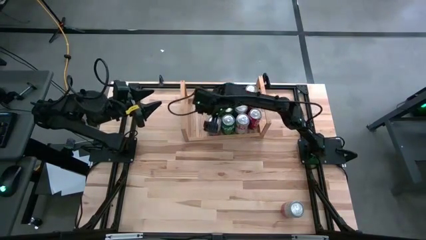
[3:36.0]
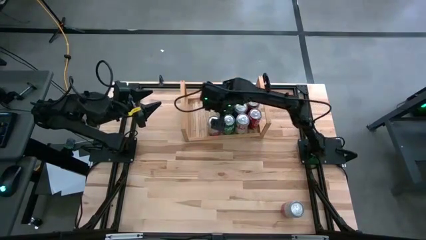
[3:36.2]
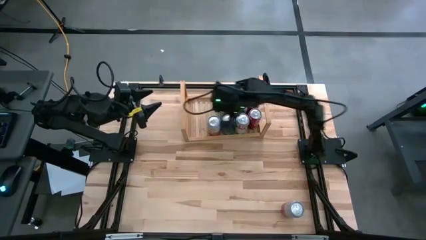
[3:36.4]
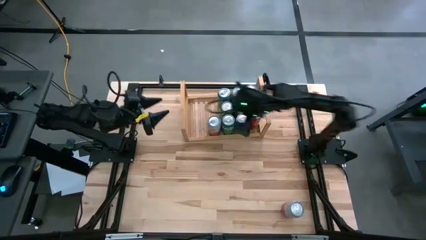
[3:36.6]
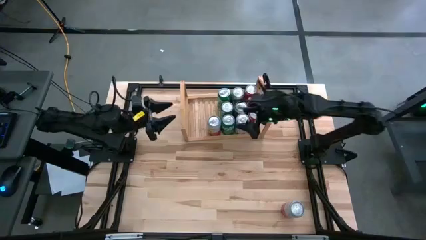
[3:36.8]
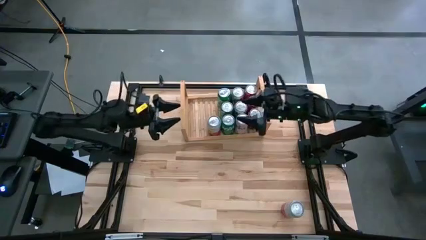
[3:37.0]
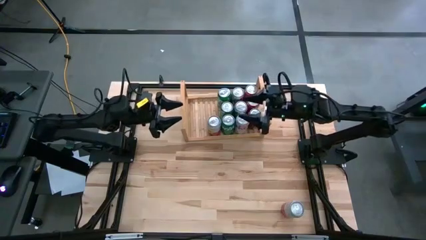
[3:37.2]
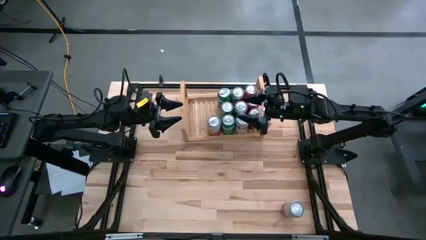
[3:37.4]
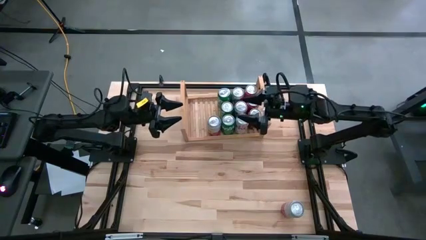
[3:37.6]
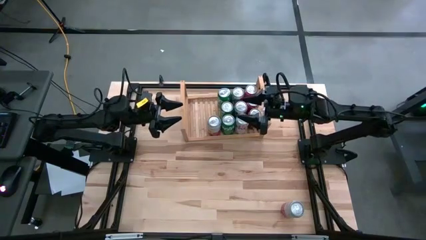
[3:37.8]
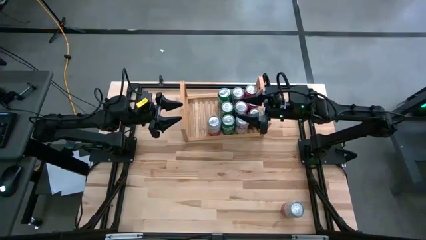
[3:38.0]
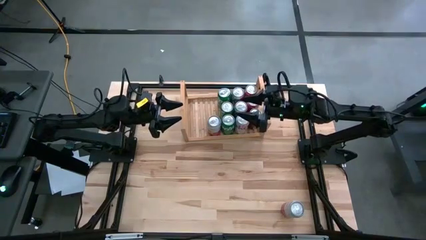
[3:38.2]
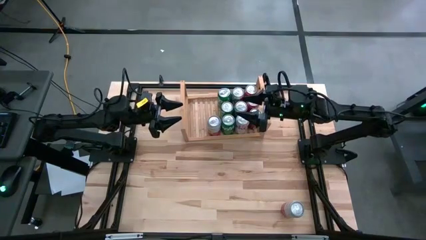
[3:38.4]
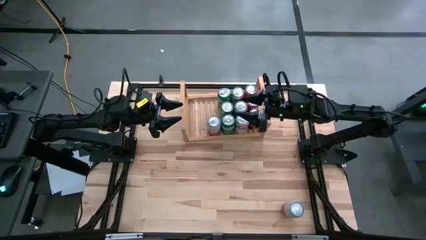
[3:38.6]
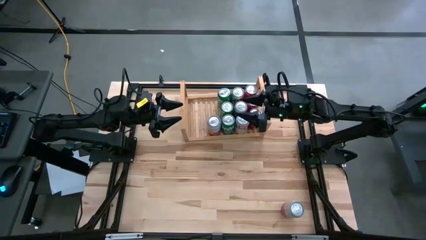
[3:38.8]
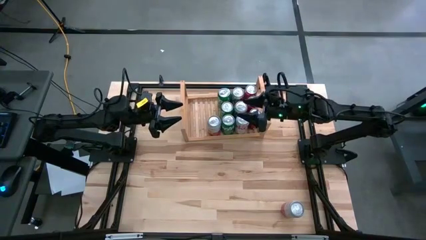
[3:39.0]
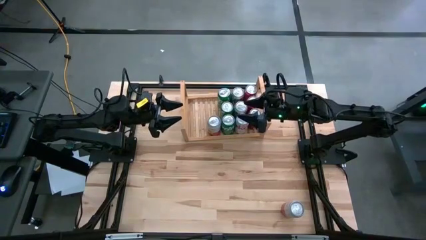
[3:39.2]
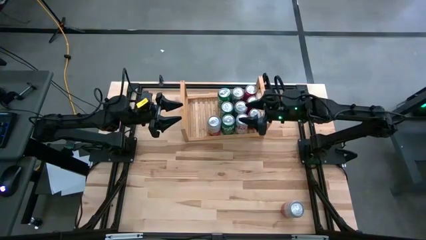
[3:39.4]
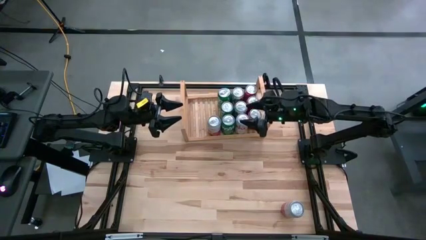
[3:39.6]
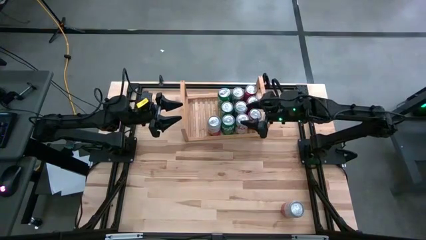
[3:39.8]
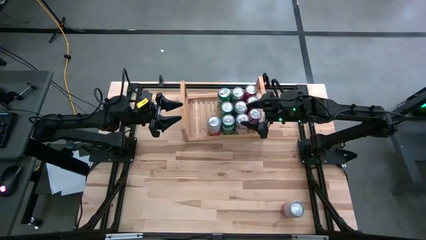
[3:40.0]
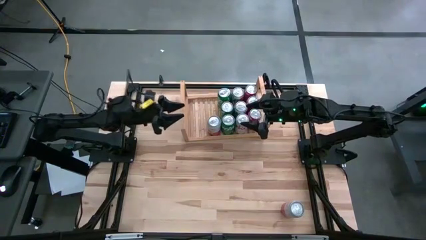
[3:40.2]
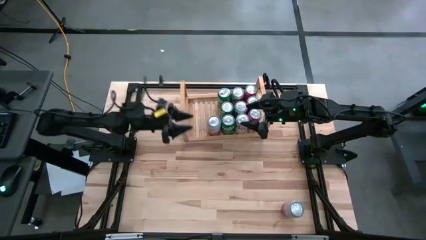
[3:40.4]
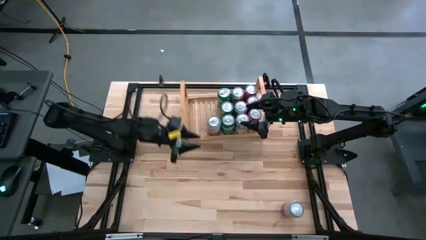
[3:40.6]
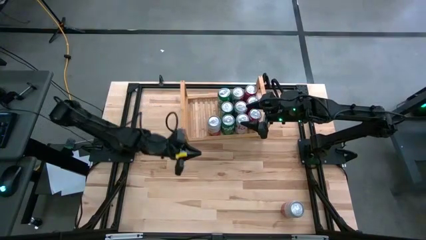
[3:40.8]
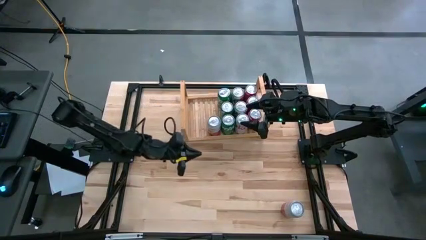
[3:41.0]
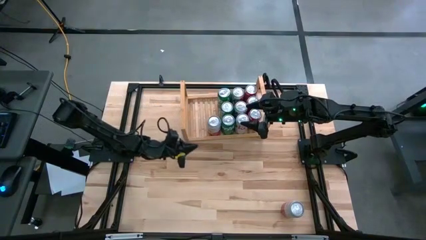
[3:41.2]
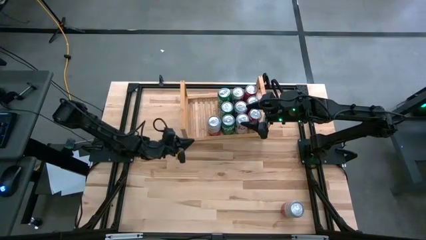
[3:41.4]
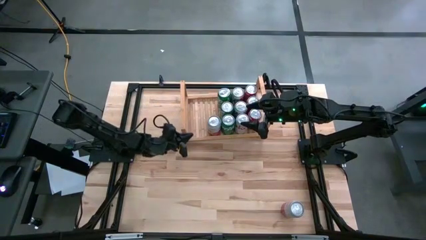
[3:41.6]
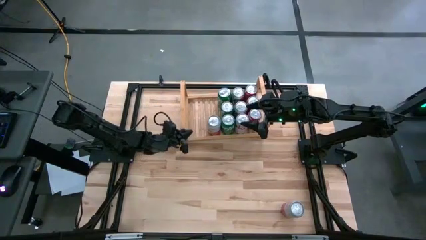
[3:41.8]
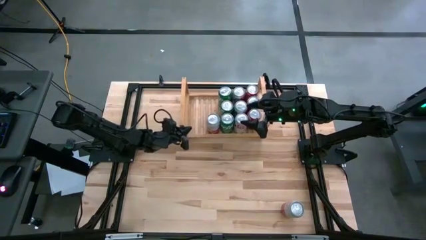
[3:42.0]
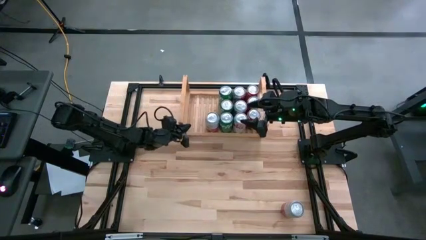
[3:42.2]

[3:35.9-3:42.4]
Task: Place canned beverage on shelf
Adjust the shelf

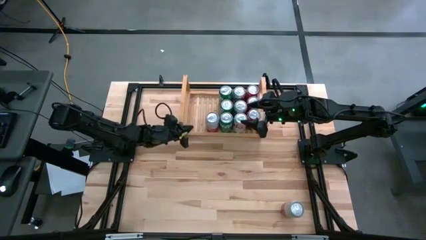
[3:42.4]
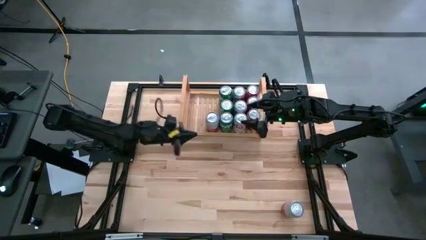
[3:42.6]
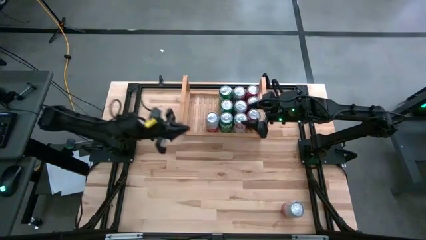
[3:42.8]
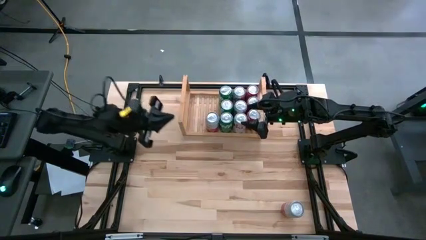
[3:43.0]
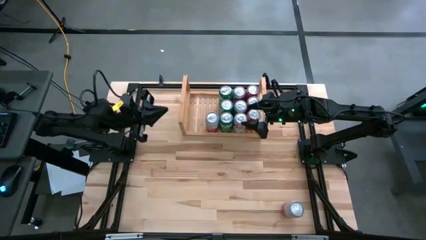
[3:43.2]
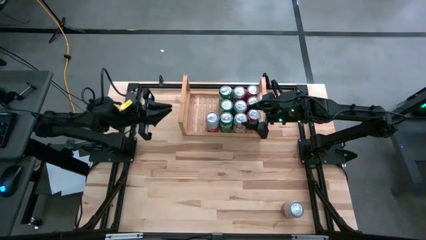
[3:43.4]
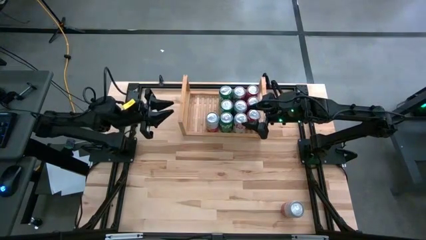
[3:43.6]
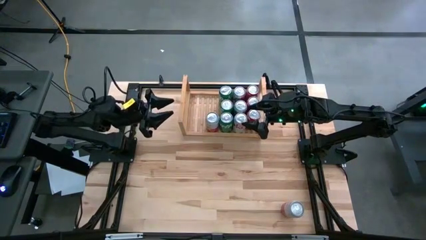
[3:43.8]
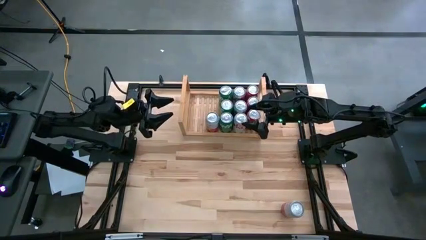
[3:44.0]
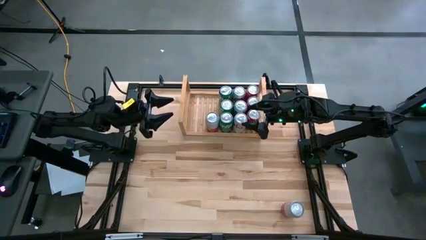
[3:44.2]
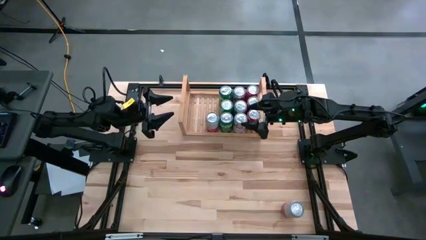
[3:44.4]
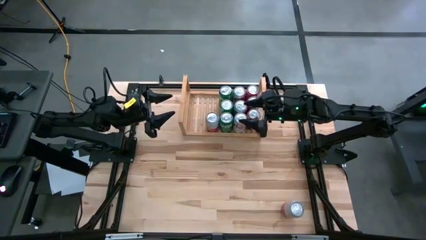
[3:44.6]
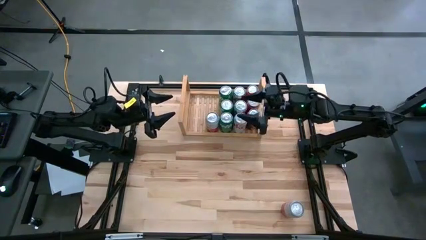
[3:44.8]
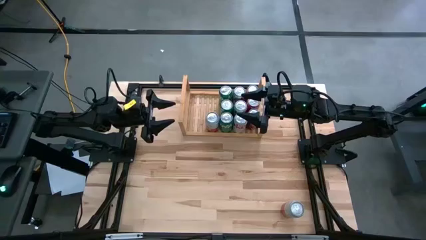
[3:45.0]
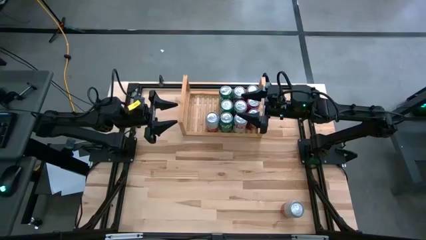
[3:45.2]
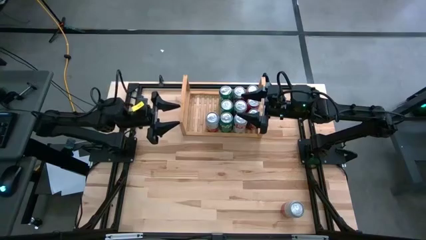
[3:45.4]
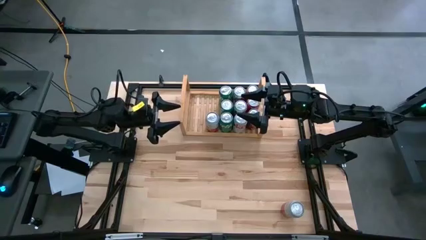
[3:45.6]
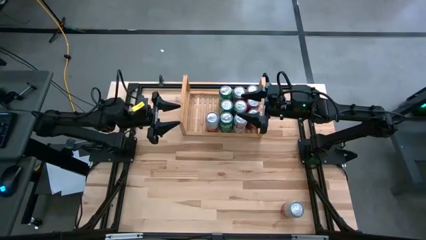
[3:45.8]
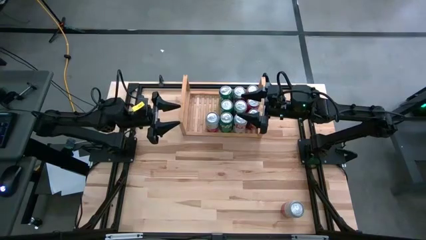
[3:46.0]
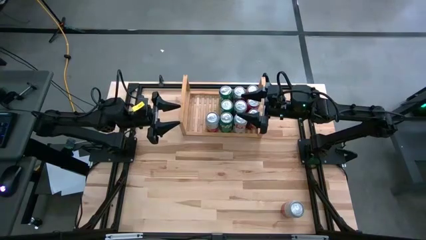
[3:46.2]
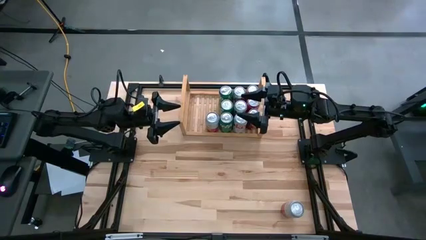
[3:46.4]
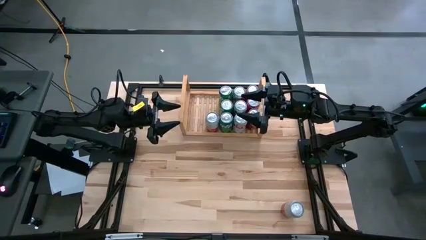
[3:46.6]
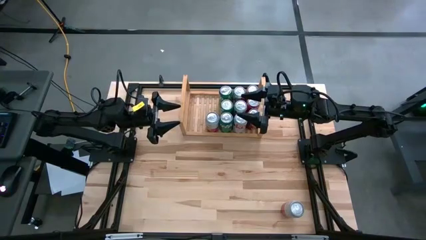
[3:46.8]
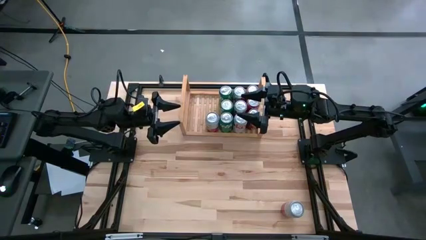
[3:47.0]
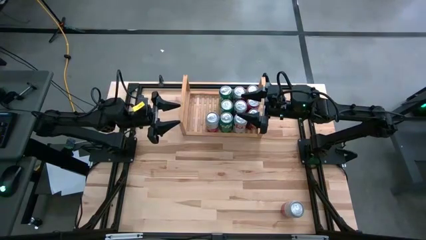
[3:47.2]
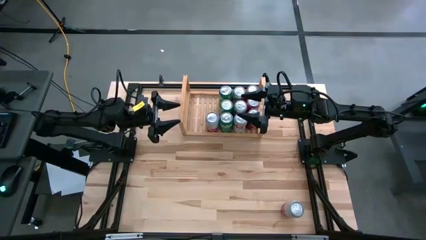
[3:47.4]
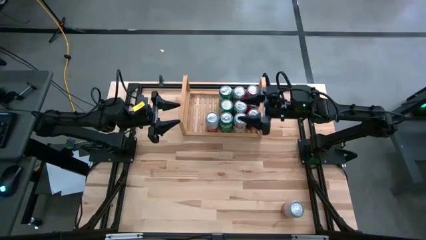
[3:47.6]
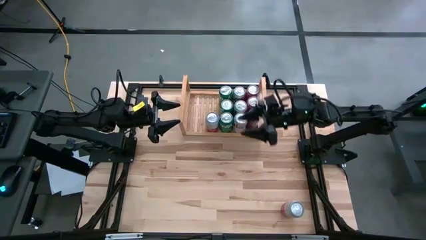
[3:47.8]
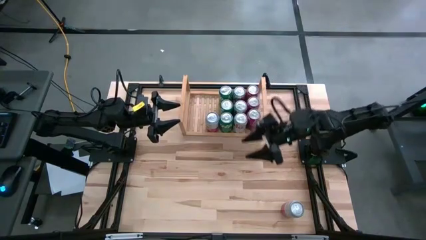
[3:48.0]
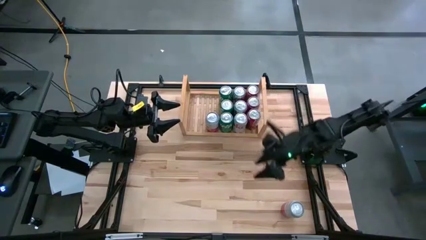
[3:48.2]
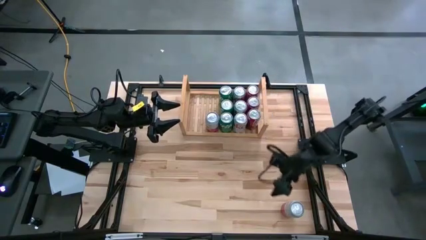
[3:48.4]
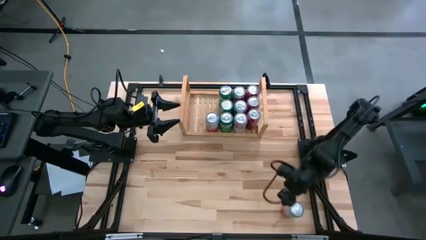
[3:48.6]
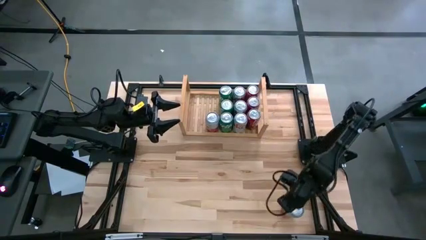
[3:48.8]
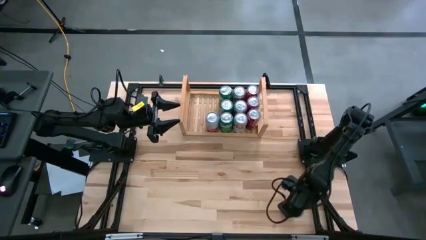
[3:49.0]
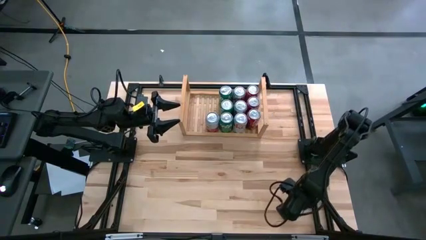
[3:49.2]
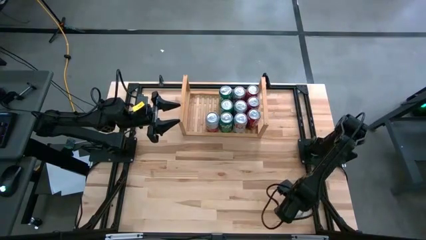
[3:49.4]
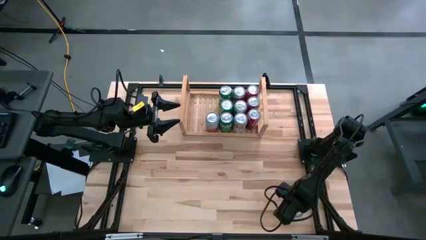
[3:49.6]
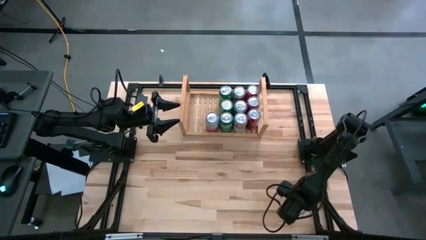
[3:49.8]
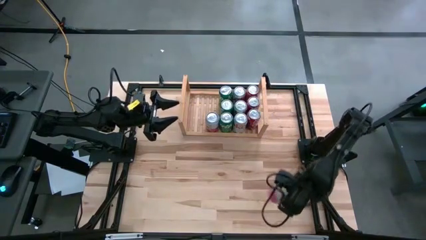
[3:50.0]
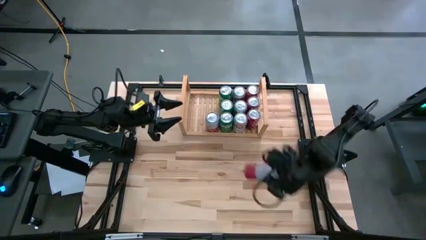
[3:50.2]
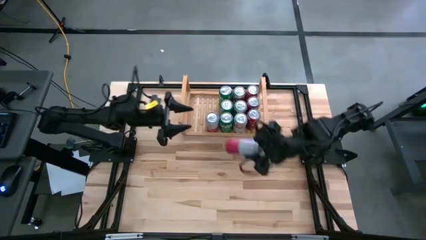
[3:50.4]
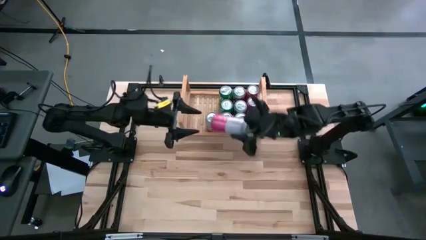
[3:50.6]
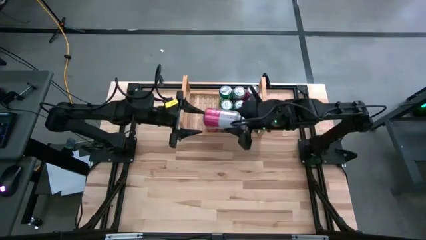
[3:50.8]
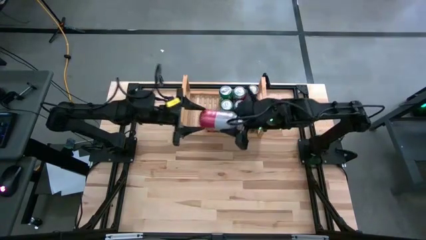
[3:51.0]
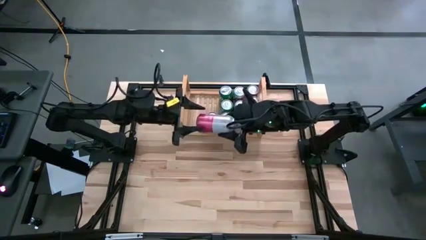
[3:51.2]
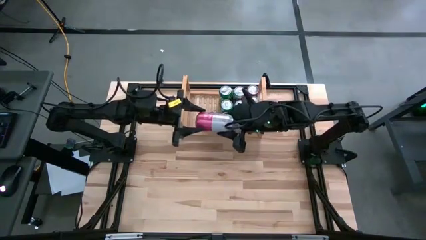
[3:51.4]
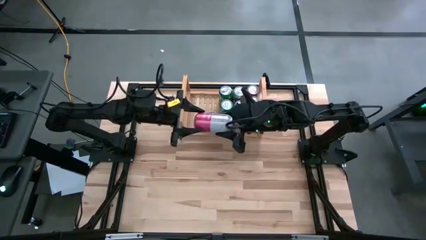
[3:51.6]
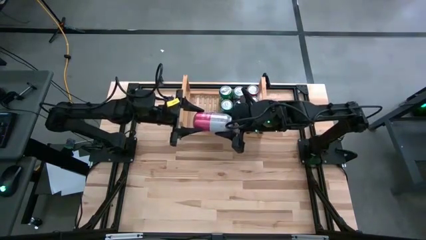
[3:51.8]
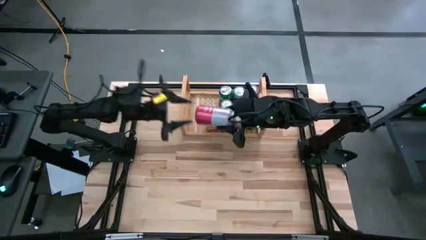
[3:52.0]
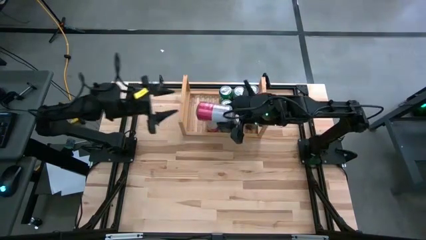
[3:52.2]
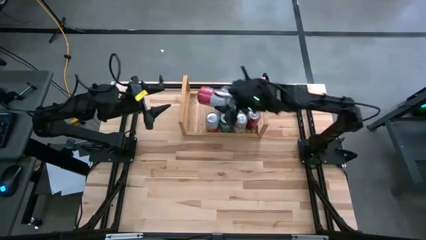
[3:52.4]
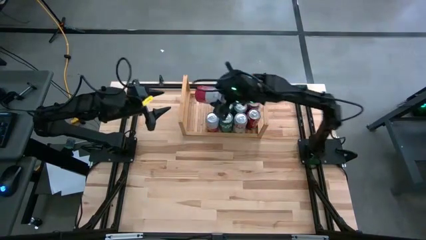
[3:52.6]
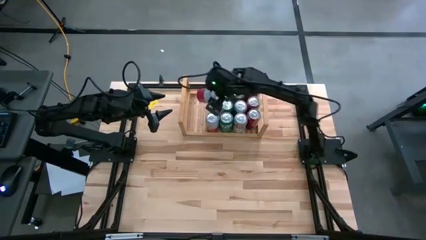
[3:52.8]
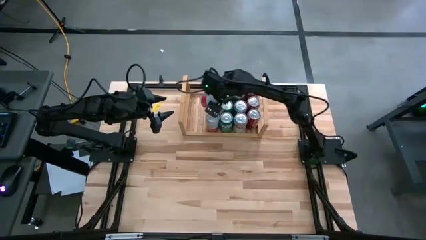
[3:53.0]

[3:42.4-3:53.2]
Put the pink-white soda can aligned with the other pink-white soda can on the shelf
